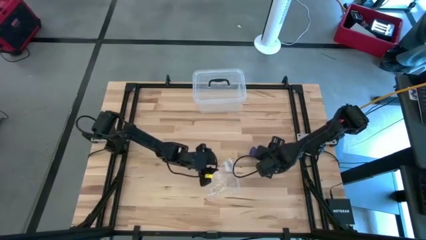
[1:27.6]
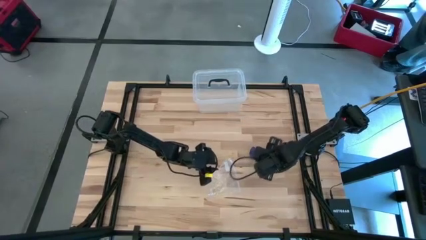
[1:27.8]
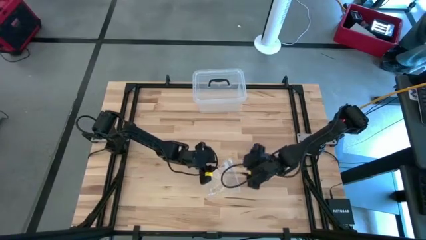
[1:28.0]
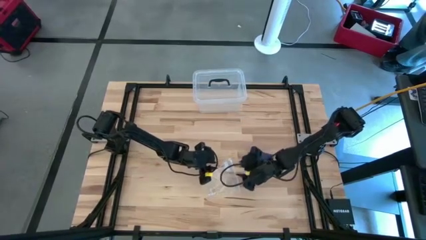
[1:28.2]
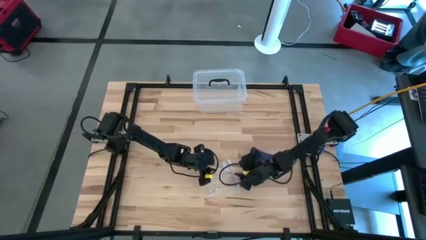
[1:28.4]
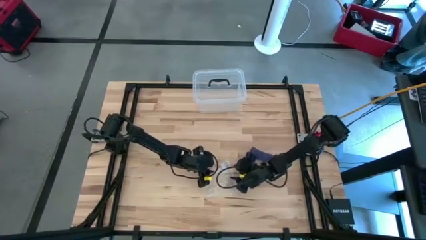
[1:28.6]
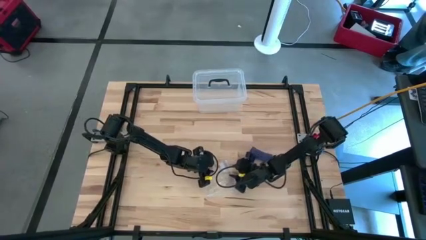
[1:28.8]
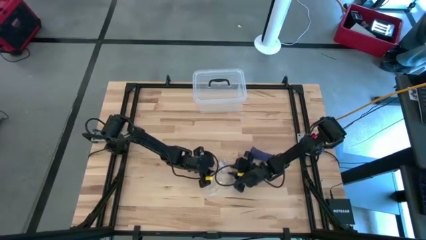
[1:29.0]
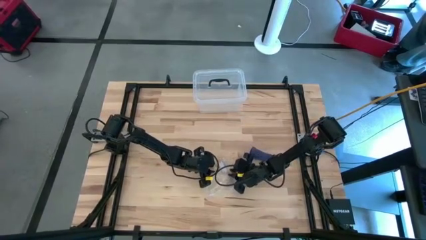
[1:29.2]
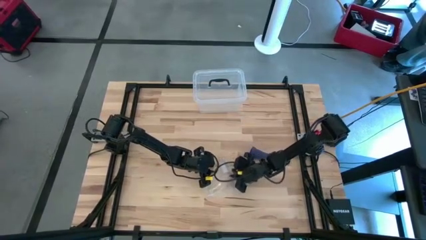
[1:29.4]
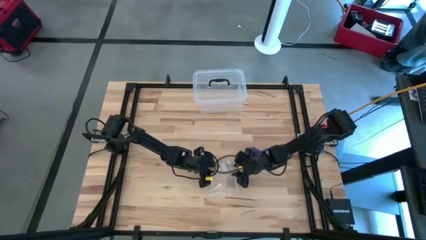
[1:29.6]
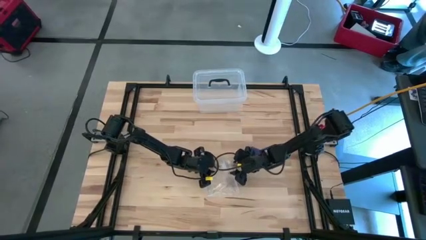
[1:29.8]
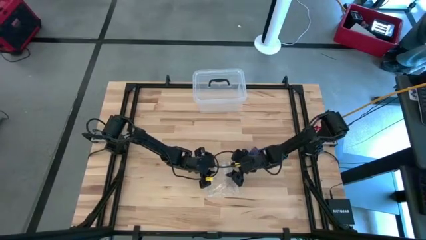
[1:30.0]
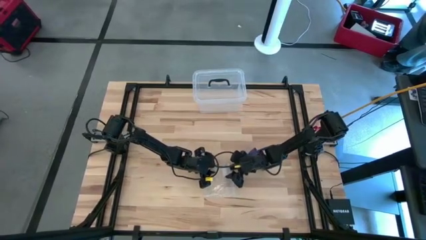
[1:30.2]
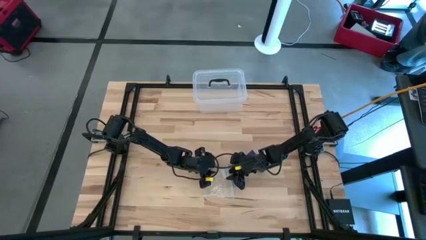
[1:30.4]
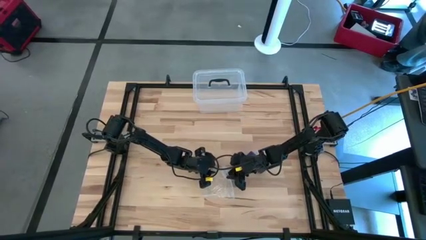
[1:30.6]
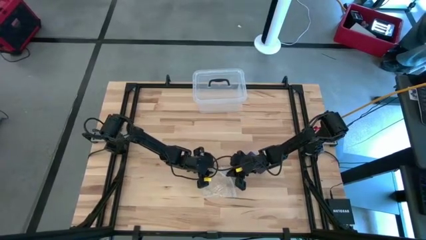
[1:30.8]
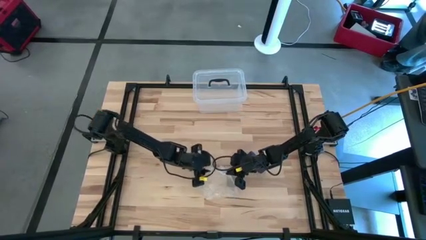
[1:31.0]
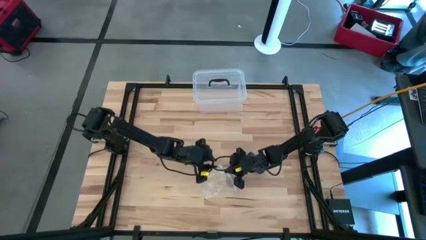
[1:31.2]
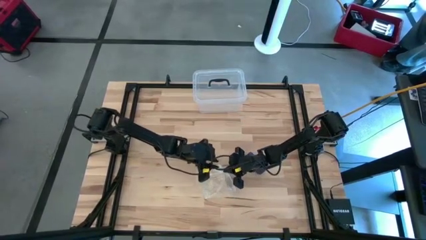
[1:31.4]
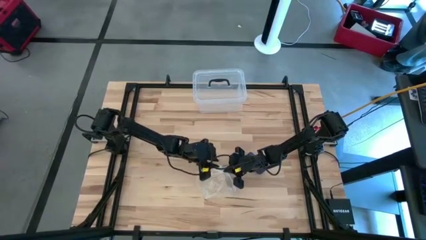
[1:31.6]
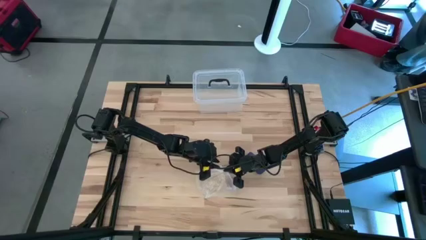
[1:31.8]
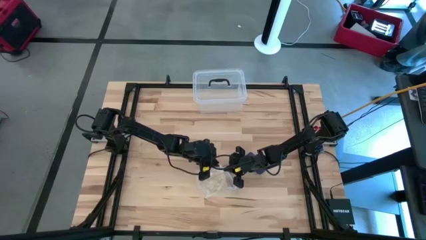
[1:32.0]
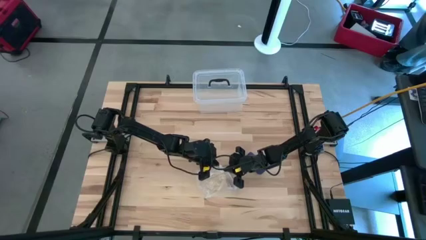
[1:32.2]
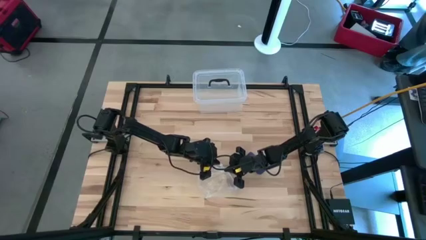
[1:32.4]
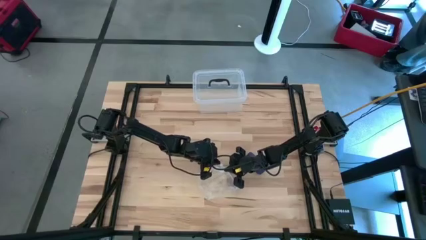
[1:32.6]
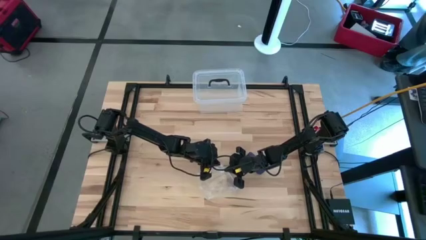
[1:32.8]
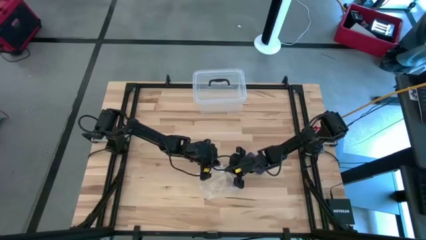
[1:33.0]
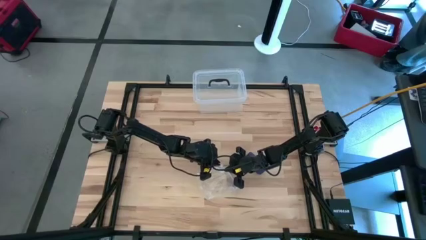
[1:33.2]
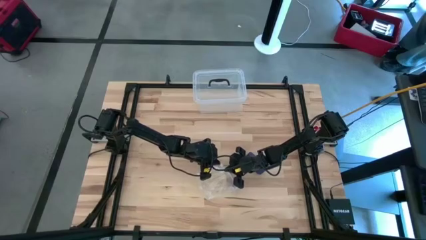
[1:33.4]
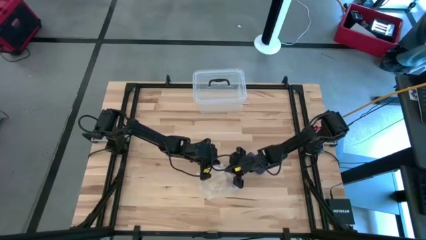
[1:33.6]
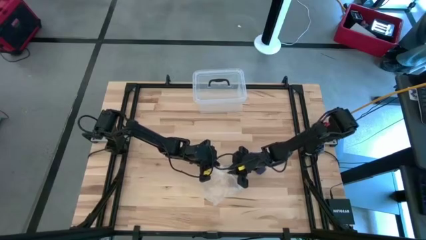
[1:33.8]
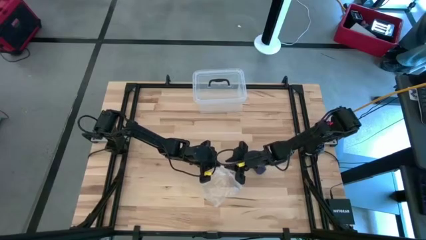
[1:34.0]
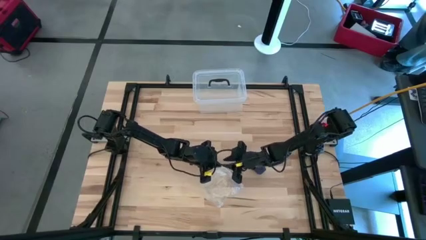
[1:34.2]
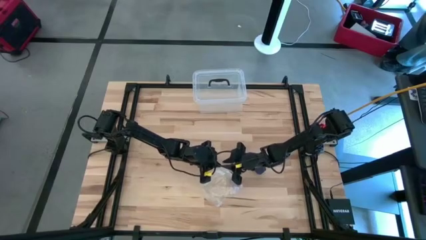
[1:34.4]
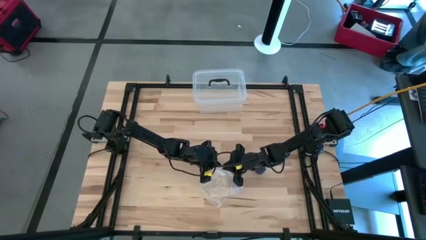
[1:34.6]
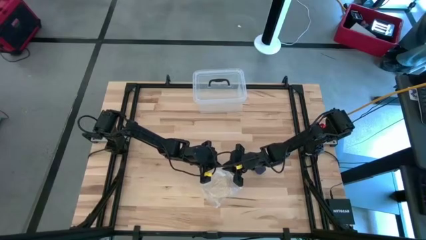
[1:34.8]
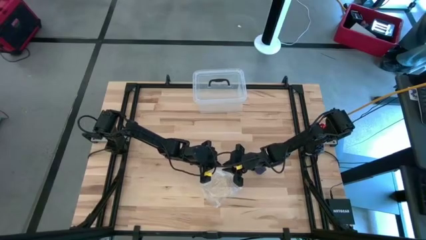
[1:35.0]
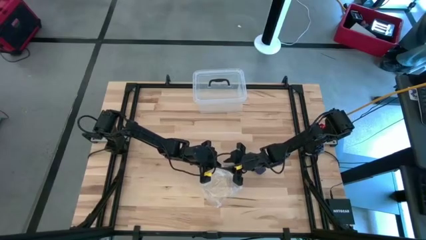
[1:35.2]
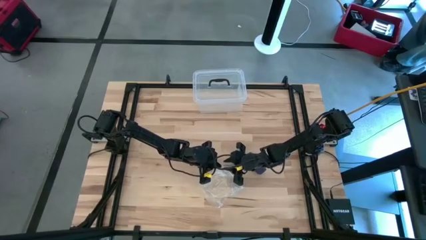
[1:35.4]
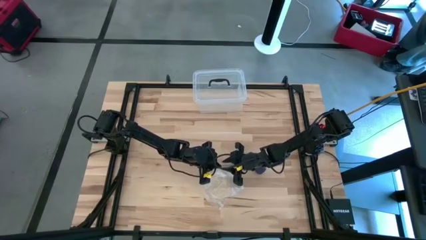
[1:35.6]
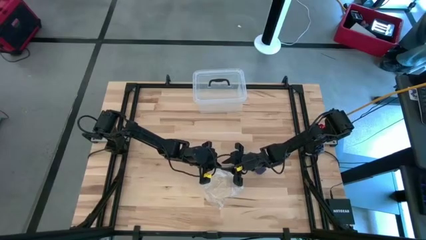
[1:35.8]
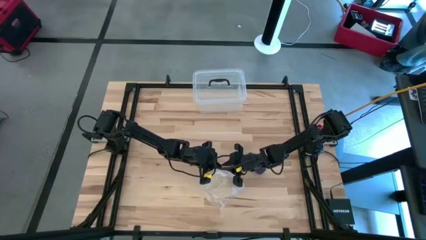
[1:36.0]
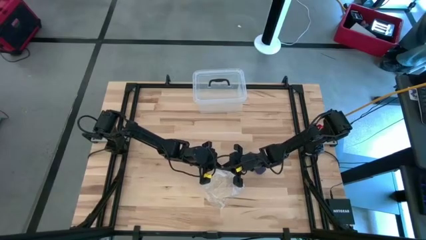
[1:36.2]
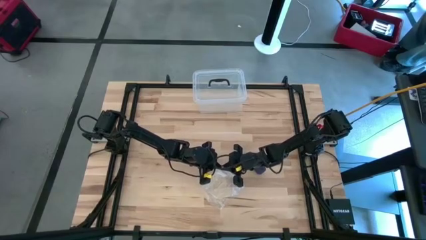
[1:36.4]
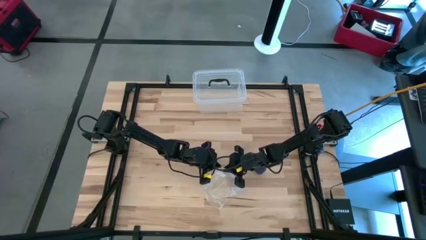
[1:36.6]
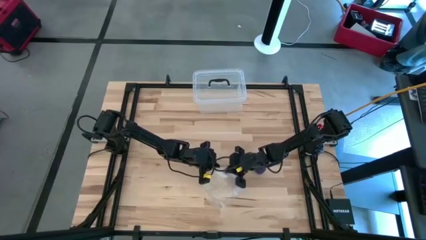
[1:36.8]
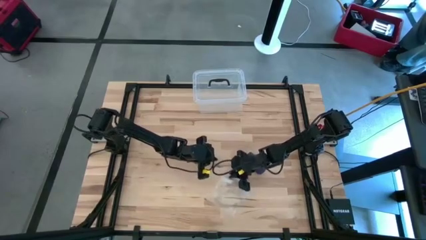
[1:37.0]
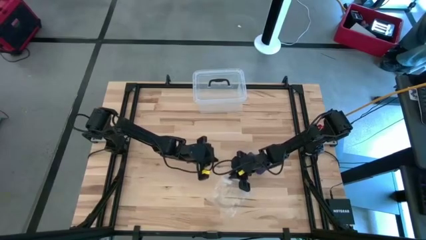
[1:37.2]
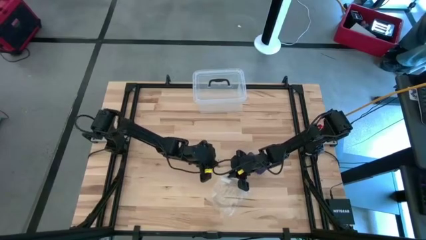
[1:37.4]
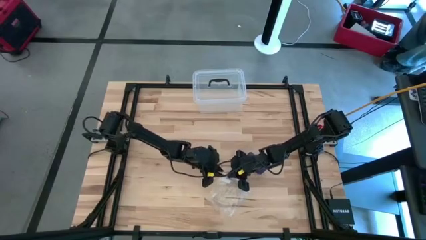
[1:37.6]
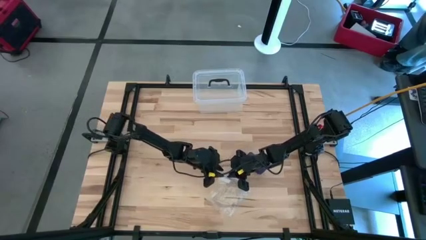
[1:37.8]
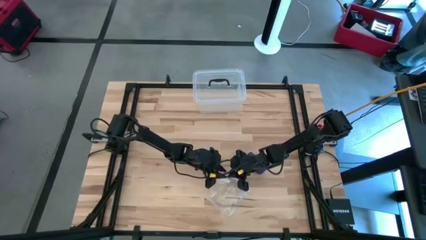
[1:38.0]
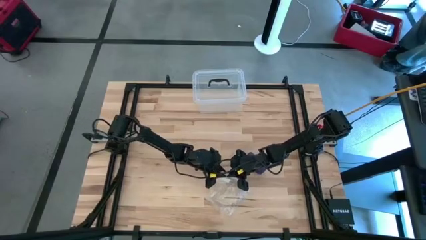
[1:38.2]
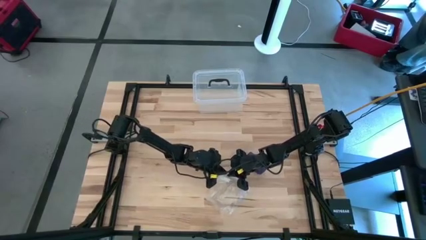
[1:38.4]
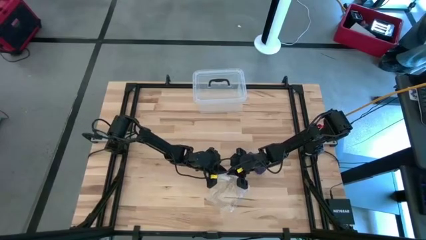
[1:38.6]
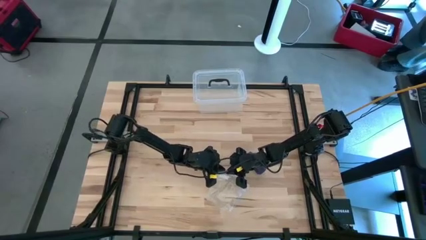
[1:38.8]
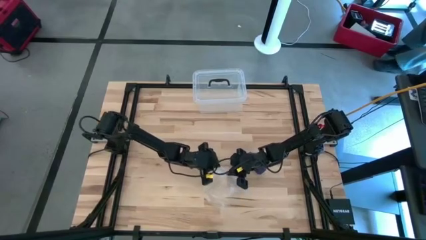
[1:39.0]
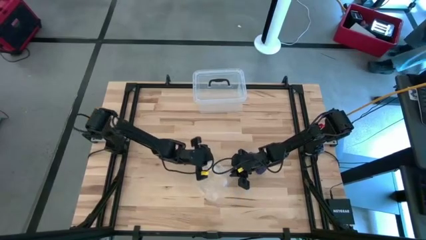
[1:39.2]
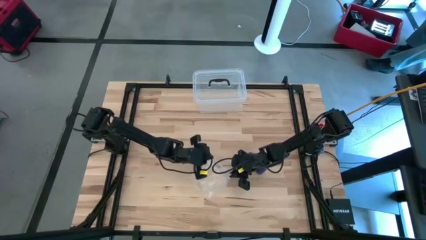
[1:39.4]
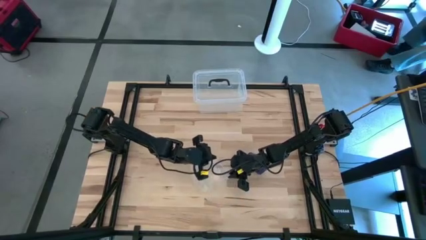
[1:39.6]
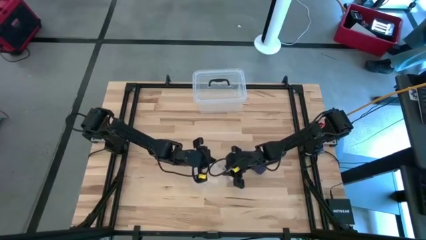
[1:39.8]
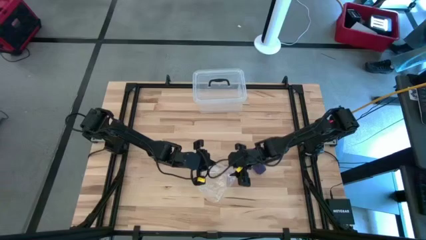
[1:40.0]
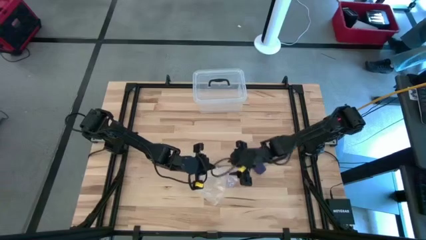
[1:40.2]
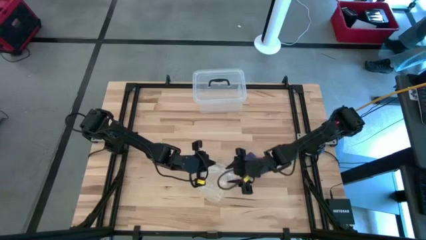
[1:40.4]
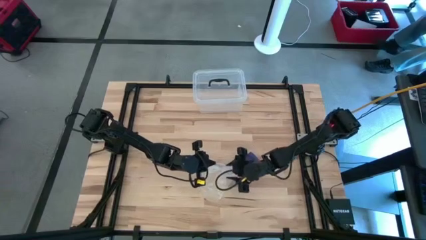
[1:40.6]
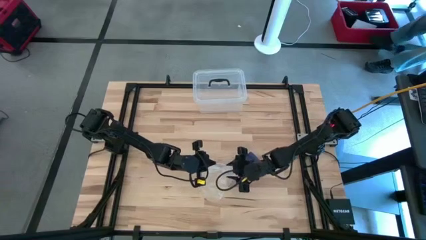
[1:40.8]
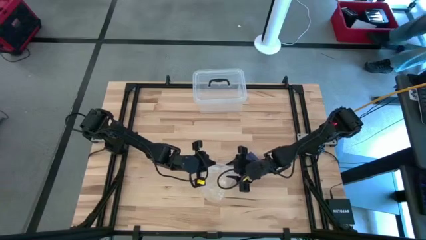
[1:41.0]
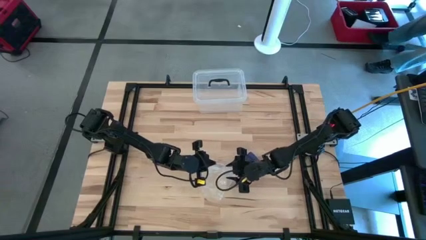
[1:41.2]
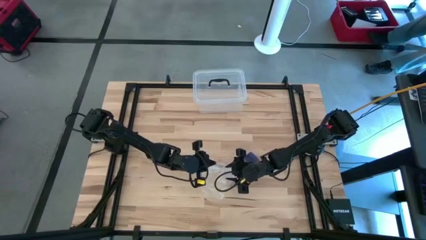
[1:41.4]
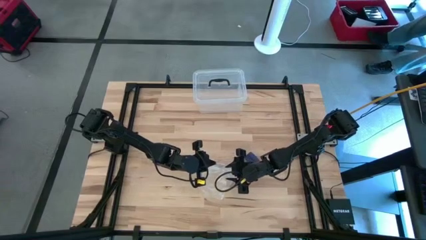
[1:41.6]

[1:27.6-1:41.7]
Task: Roll bandage
Open the transparent zip bag
